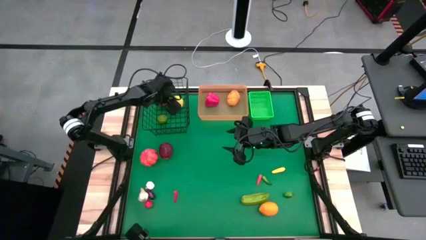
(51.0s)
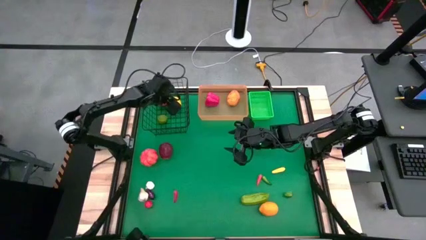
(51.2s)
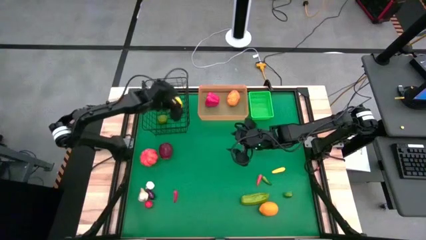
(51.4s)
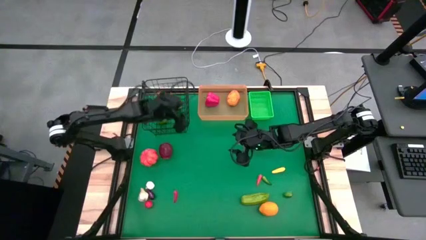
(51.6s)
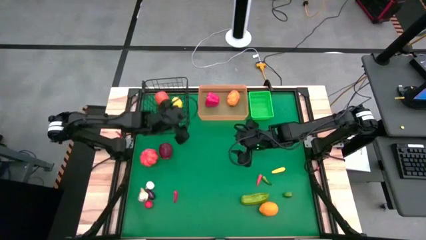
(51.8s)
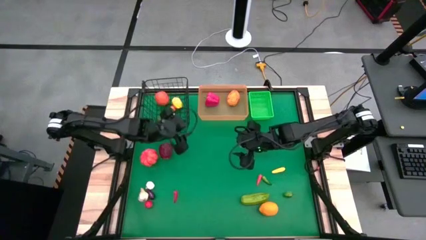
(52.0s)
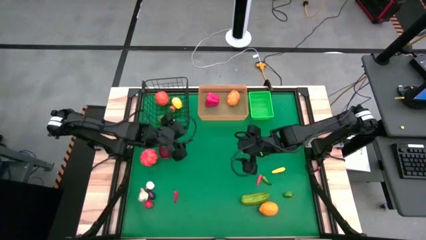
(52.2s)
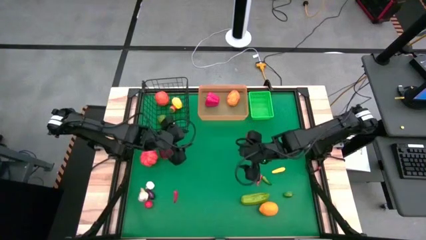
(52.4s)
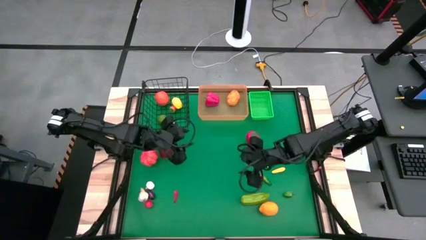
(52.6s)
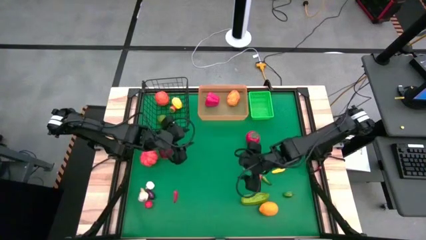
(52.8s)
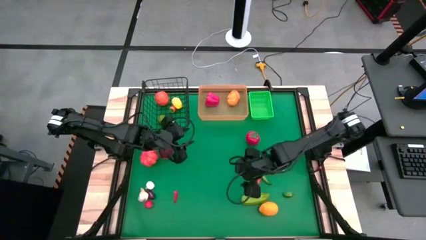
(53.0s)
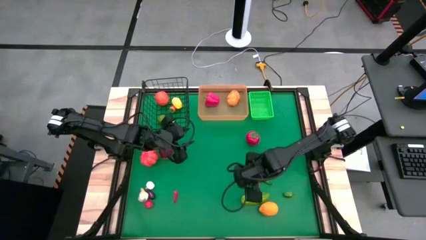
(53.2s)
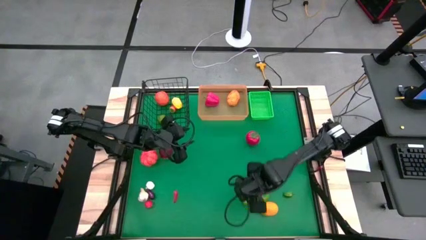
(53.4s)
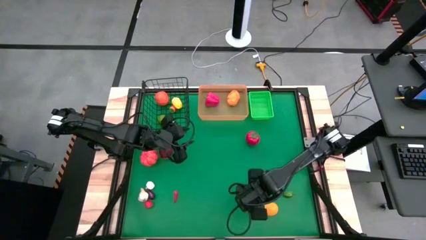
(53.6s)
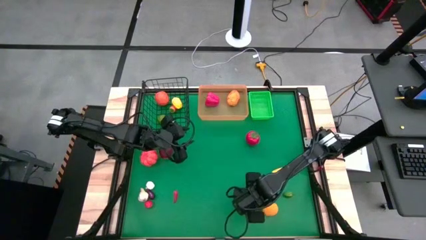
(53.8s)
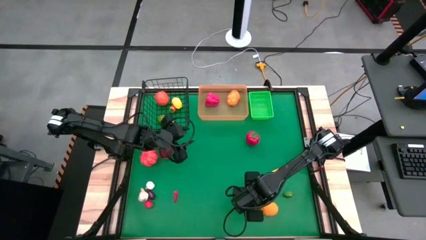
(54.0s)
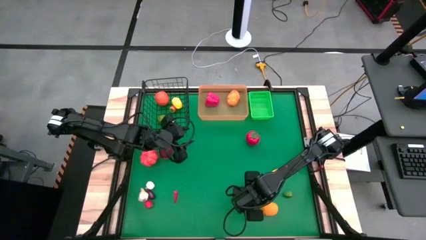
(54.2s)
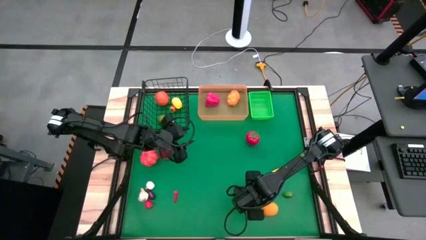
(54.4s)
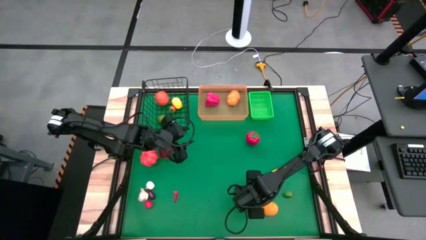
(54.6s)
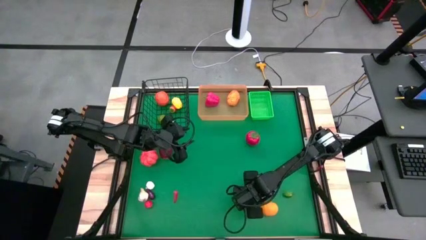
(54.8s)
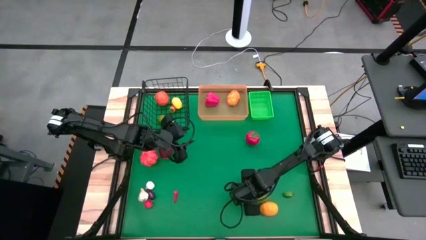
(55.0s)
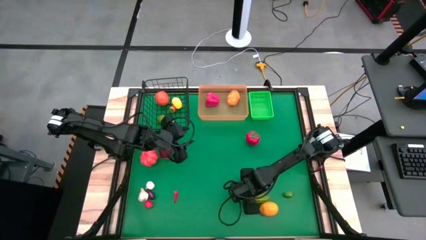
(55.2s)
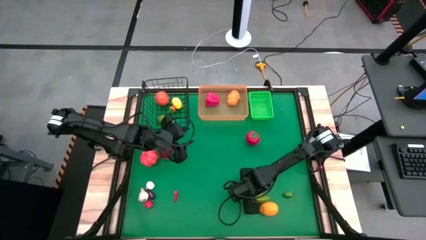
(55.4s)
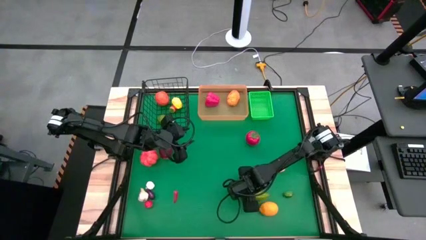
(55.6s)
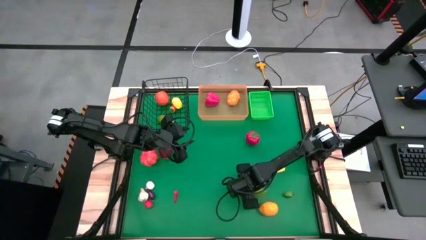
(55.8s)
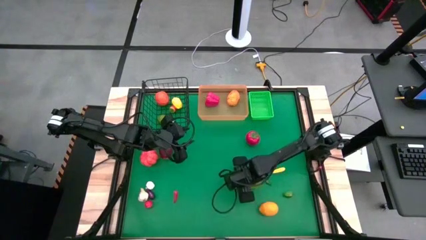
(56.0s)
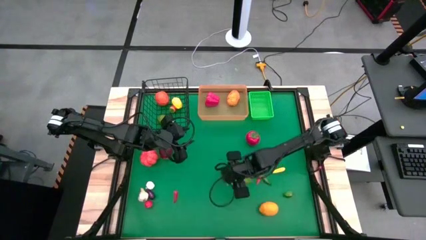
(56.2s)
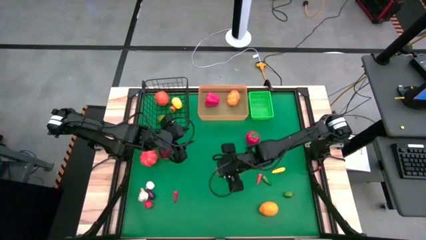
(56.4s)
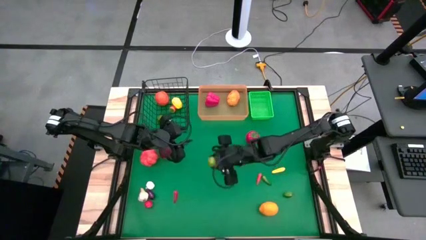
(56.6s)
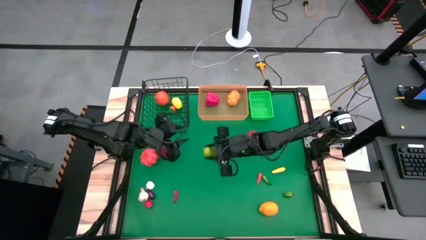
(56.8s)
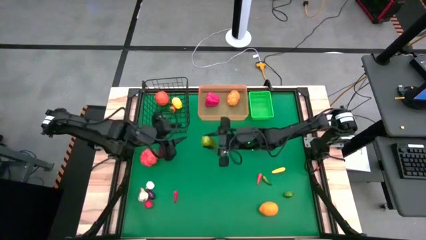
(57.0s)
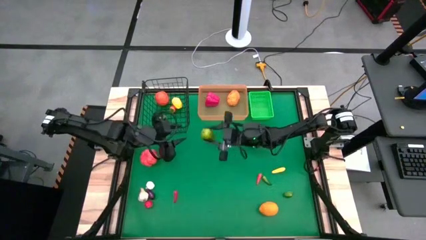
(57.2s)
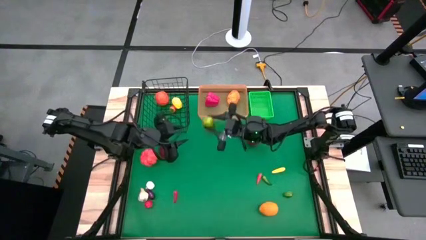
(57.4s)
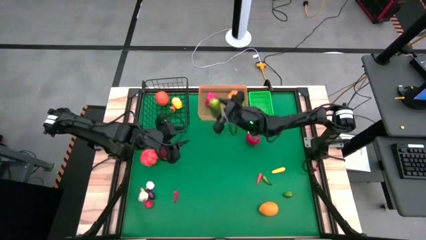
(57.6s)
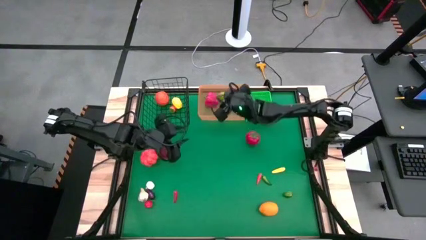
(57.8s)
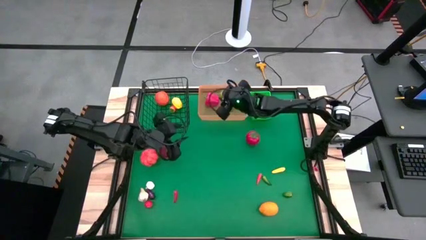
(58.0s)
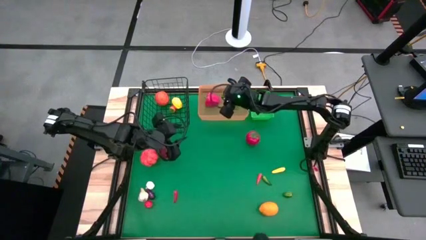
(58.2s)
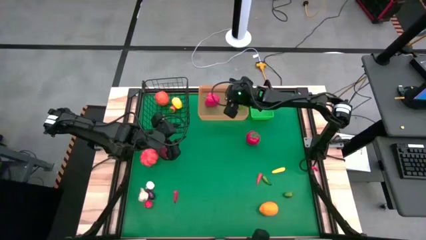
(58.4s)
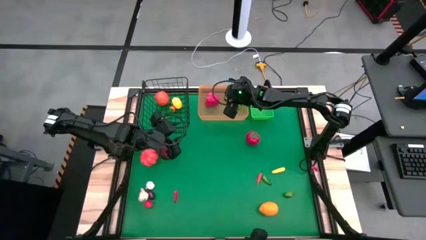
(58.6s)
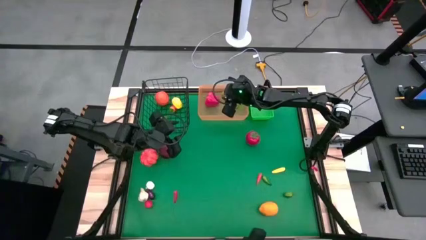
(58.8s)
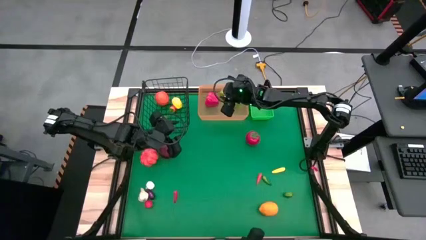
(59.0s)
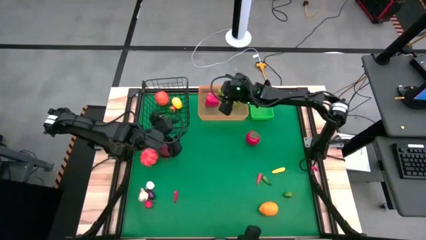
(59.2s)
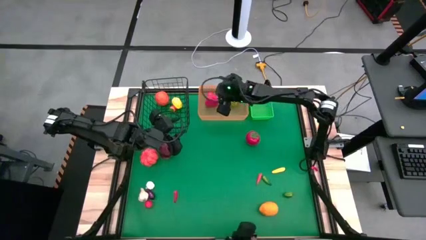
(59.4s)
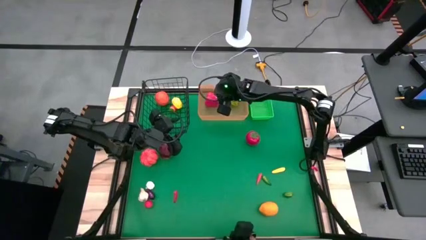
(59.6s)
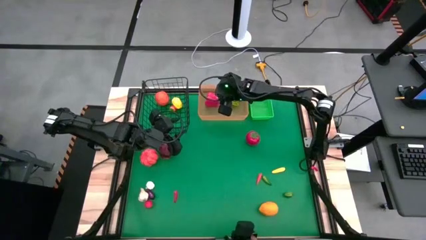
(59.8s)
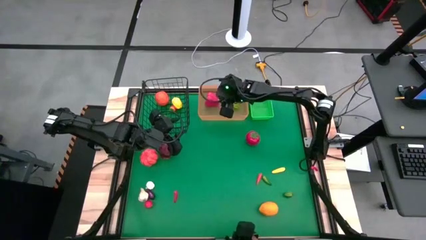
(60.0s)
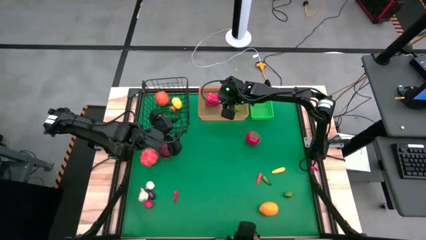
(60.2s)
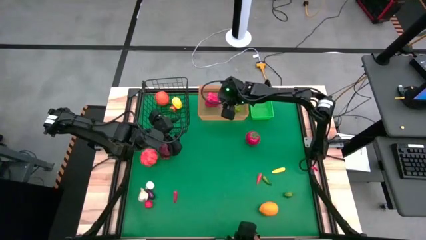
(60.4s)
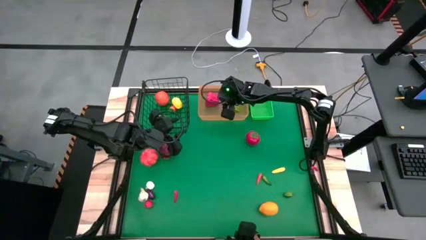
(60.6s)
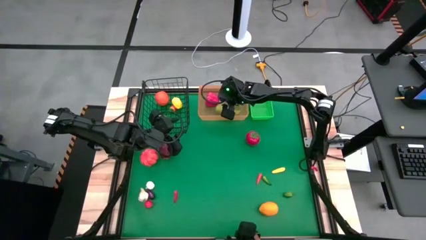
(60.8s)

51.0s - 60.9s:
Task: Sort produce into baskets
Put the green cucumber into the orange bin

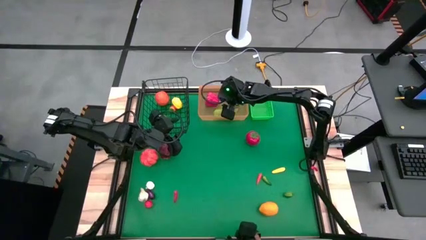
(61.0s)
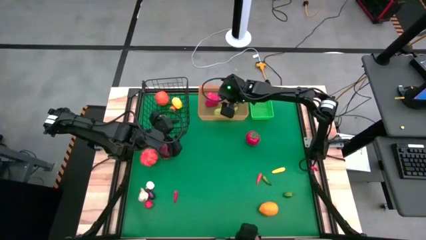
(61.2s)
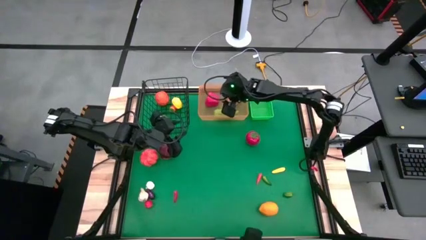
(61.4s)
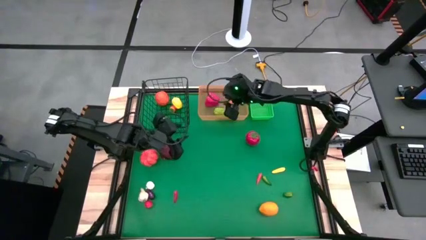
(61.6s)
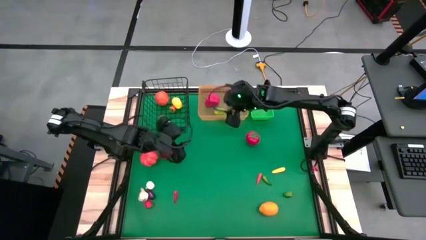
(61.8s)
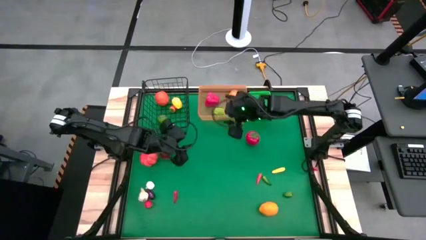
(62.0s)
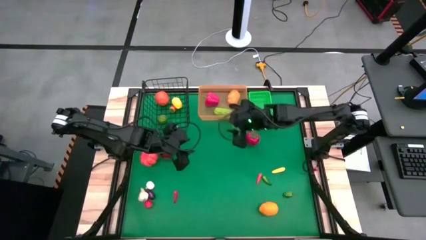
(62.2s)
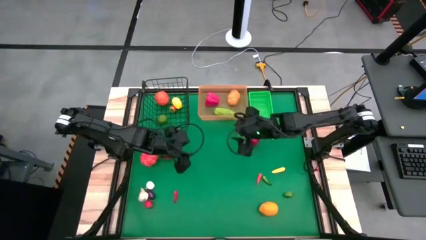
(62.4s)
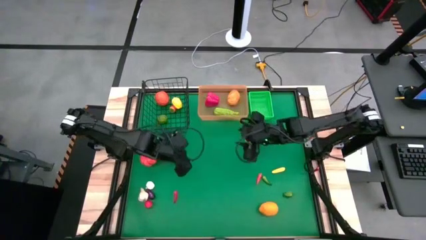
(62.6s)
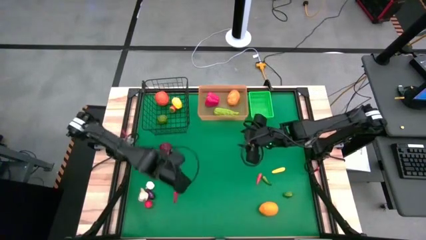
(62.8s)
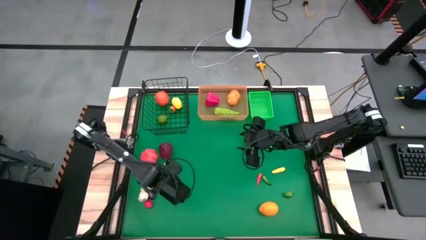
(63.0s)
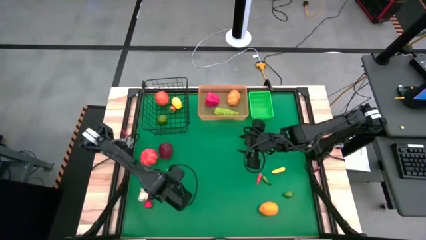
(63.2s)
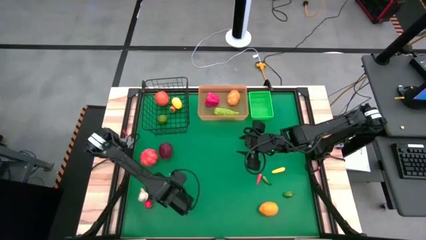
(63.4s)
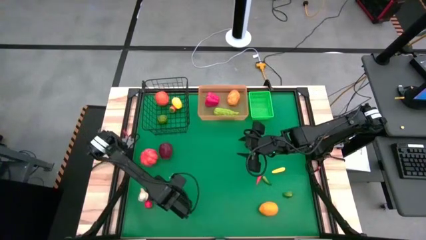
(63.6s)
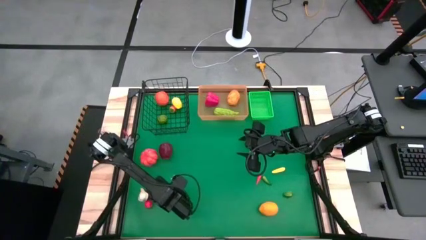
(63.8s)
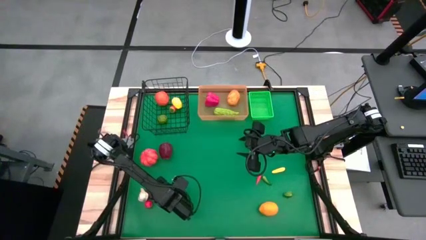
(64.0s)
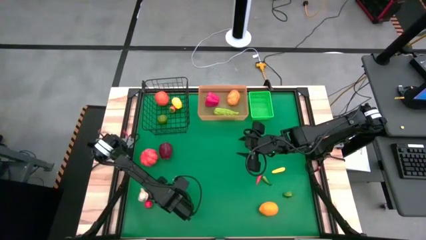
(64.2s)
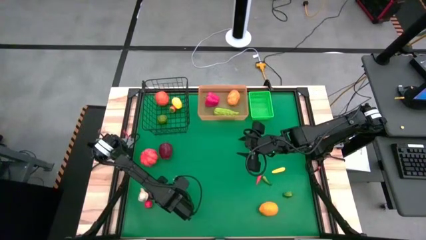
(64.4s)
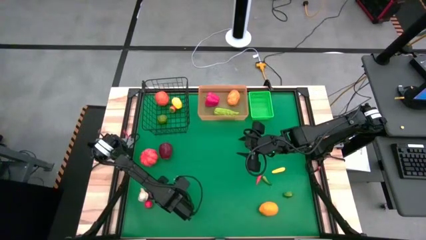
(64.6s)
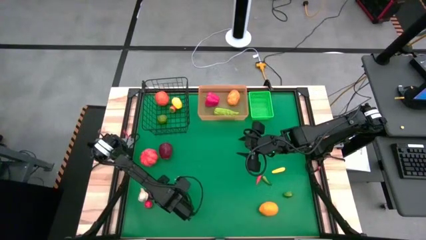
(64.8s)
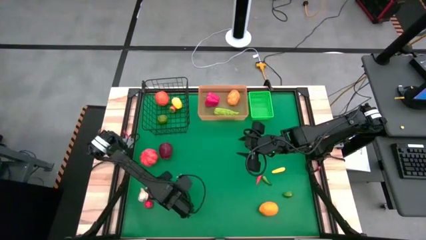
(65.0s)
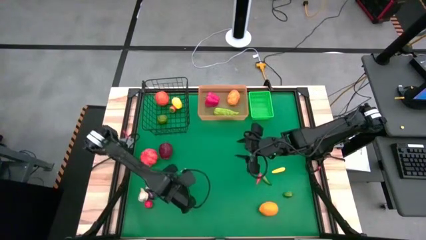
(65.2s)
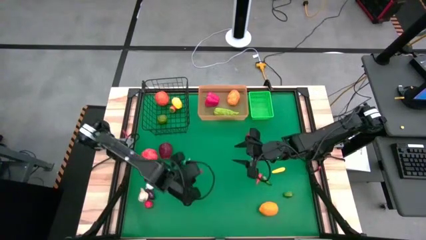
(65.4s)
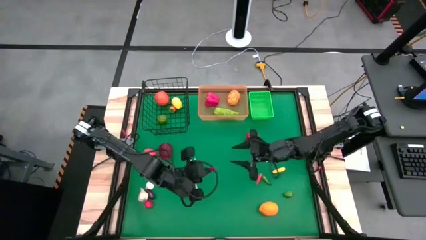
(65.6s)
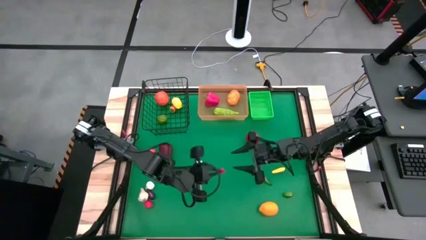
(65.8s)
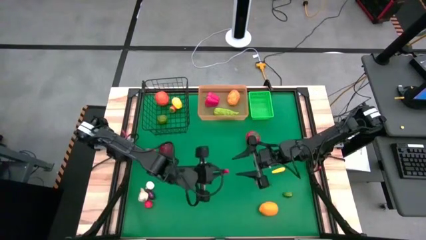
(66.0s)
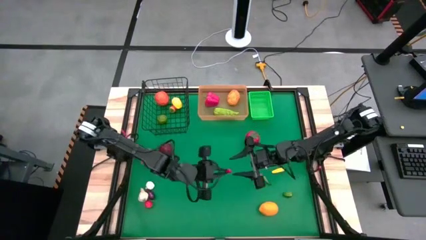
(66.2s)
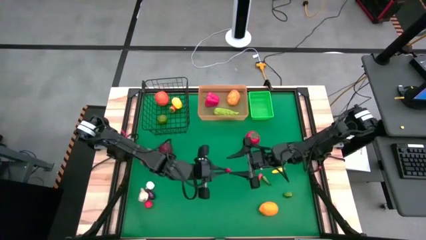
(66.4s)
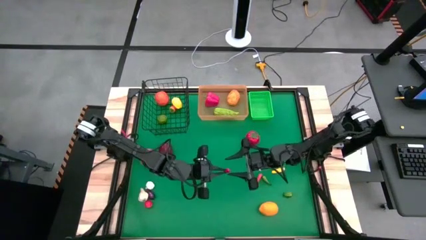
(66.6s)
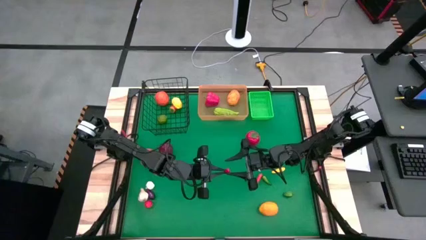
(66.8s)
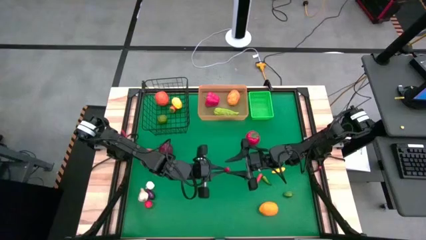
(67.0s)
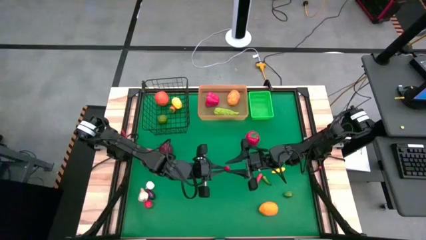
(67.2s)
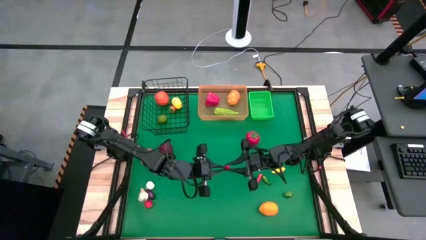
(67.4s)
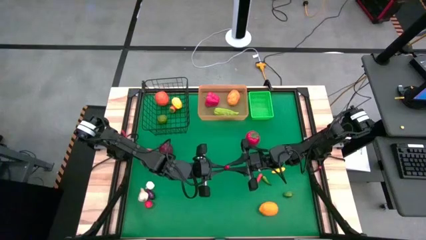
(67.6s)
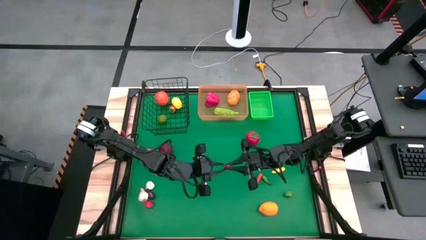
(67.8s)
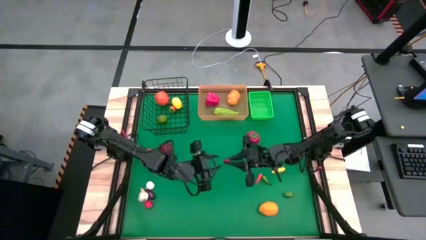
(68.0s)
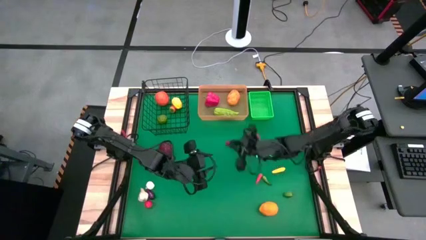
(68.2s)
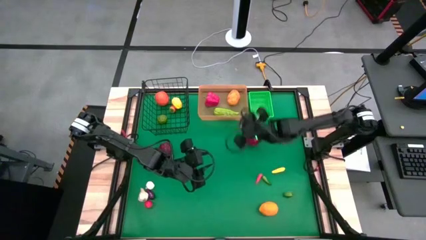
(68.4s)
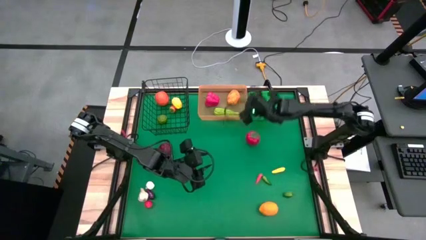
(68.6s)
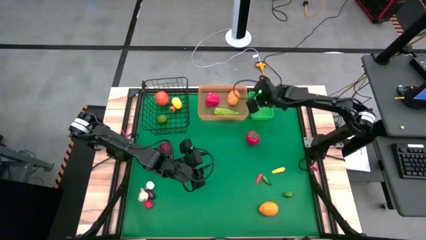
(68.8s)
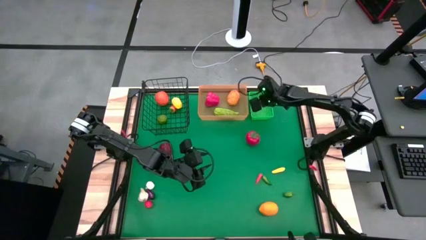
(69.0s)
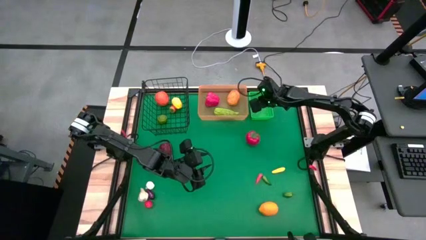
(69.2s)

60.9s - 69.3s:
Put the red chili pepper into the green basket
